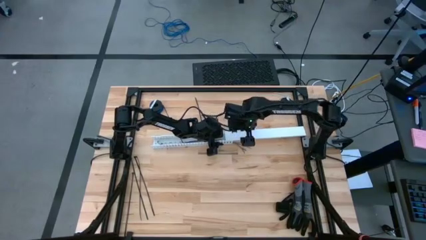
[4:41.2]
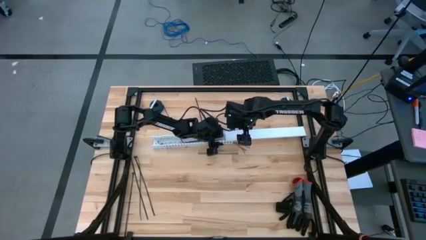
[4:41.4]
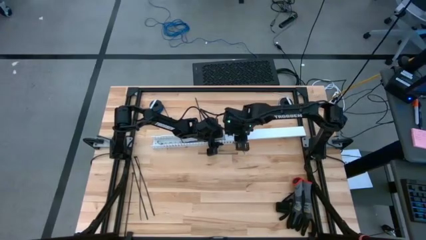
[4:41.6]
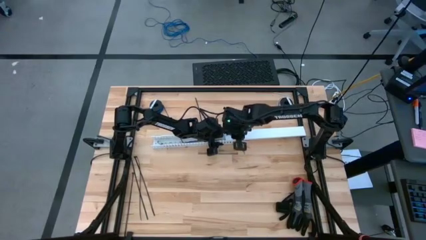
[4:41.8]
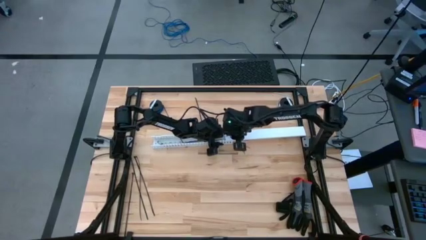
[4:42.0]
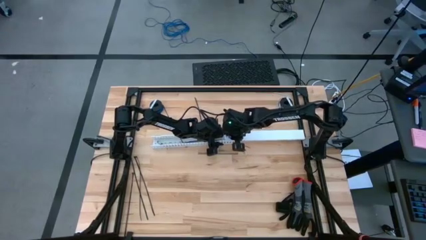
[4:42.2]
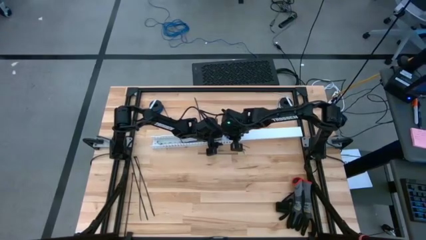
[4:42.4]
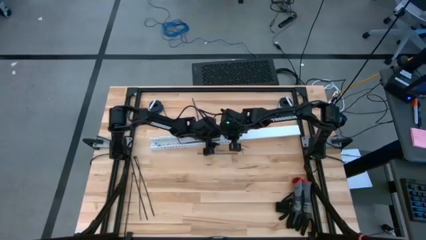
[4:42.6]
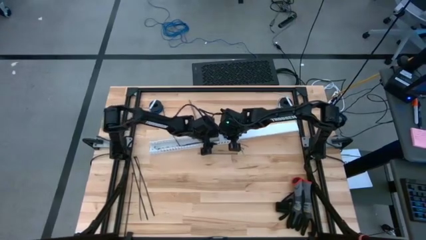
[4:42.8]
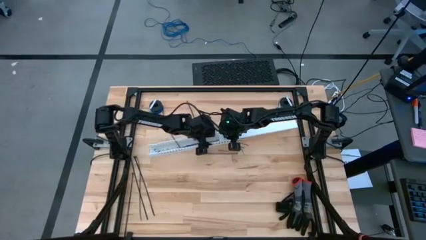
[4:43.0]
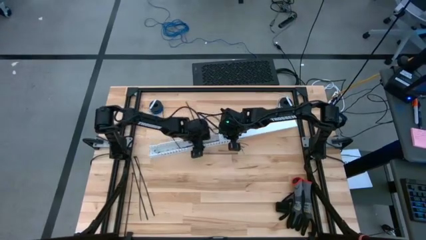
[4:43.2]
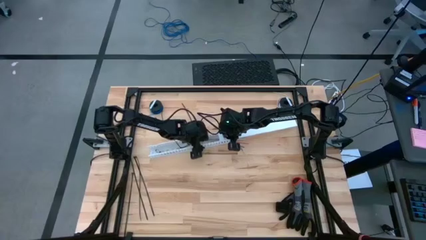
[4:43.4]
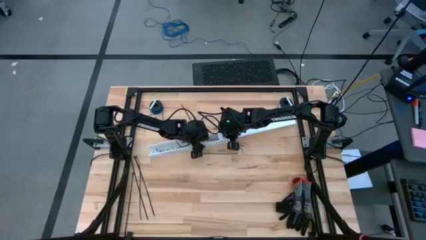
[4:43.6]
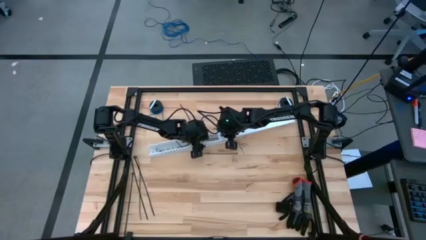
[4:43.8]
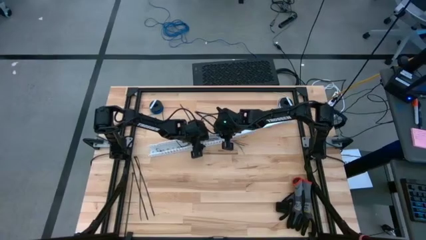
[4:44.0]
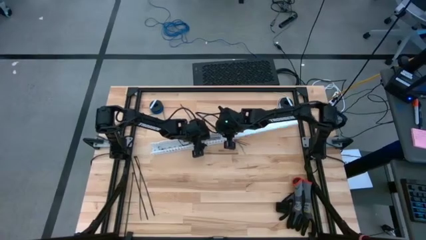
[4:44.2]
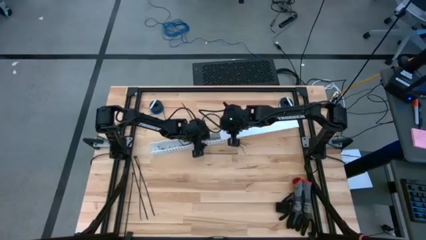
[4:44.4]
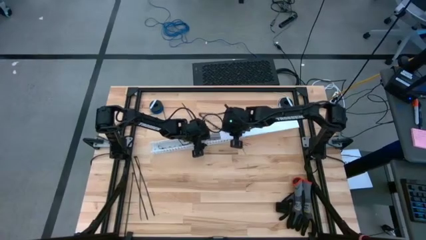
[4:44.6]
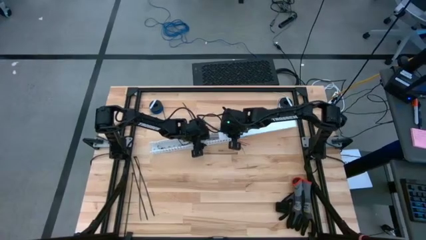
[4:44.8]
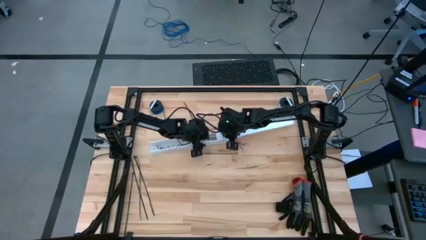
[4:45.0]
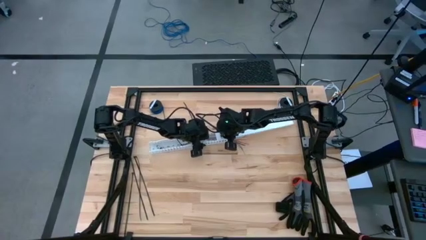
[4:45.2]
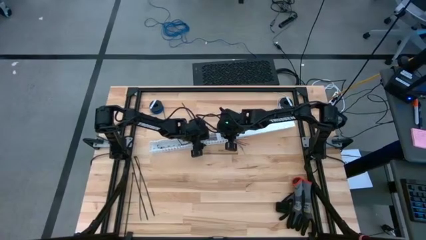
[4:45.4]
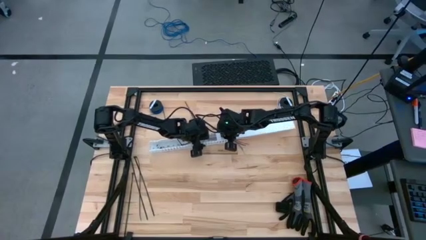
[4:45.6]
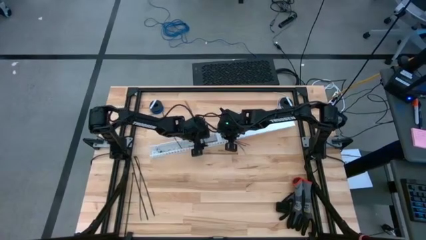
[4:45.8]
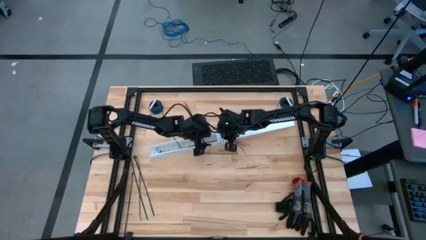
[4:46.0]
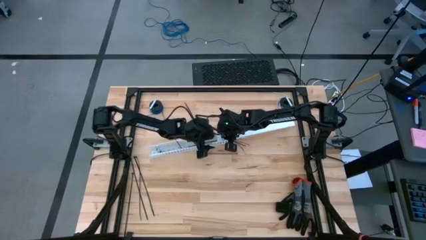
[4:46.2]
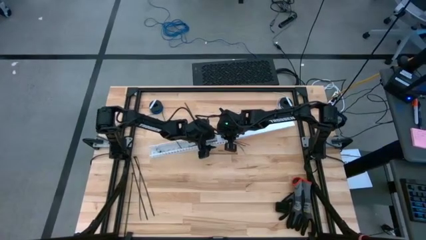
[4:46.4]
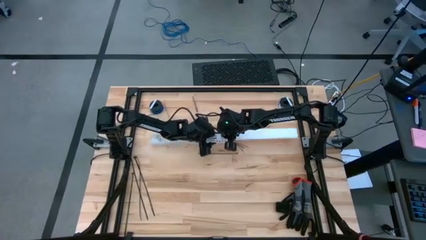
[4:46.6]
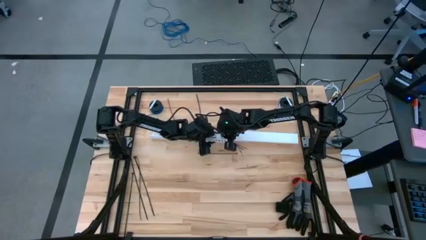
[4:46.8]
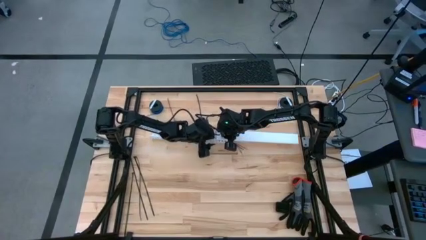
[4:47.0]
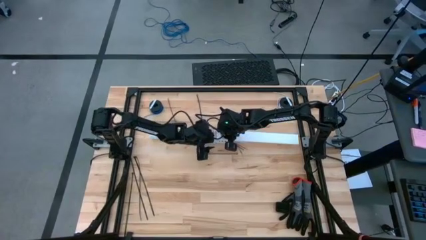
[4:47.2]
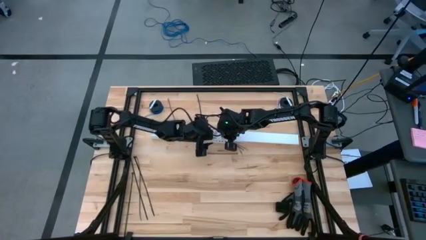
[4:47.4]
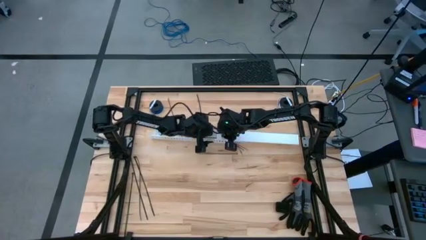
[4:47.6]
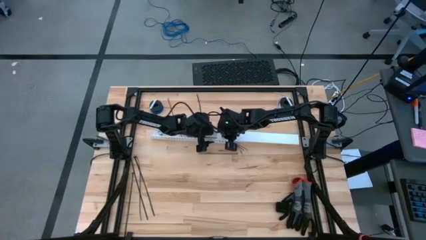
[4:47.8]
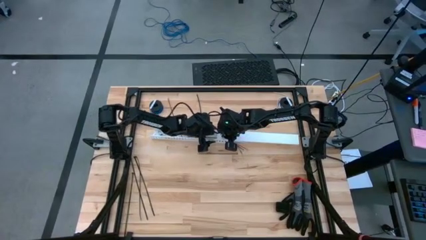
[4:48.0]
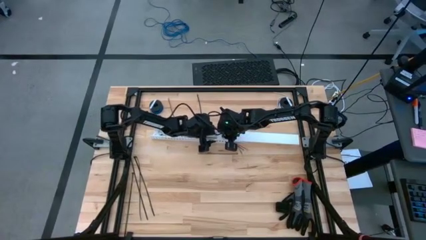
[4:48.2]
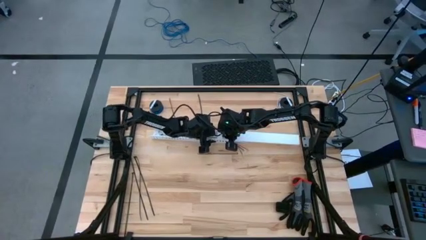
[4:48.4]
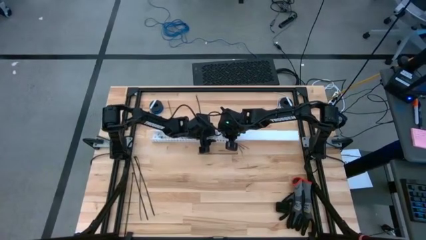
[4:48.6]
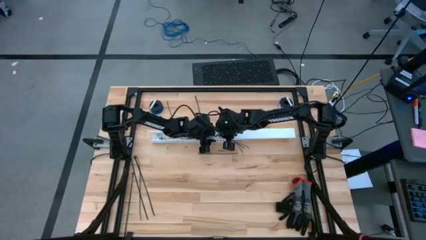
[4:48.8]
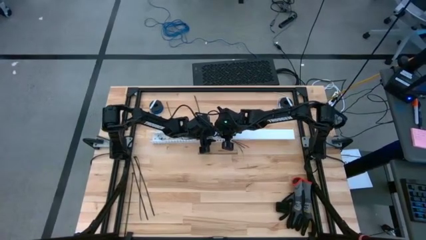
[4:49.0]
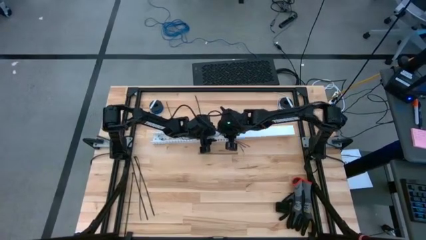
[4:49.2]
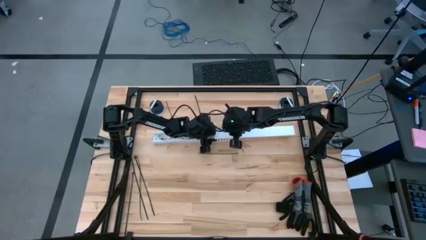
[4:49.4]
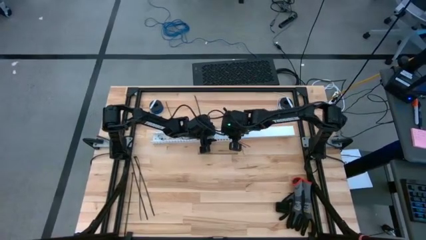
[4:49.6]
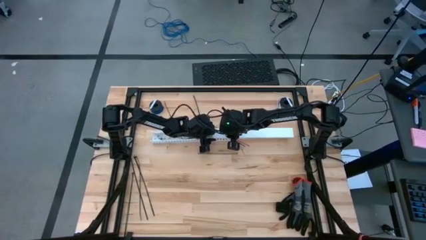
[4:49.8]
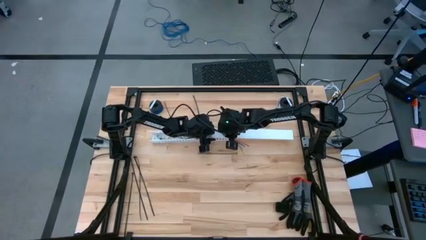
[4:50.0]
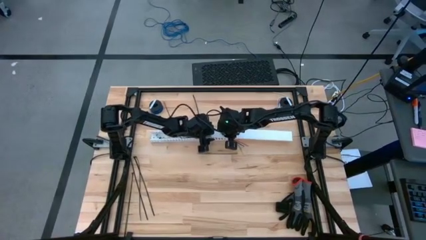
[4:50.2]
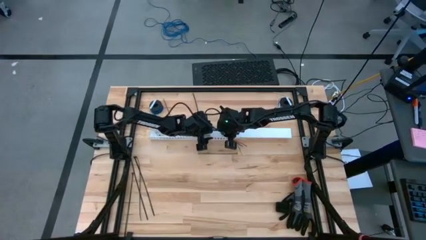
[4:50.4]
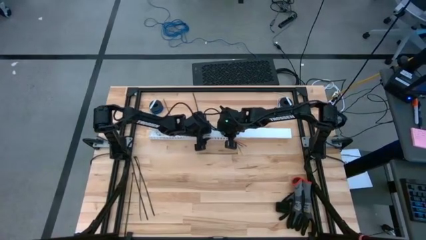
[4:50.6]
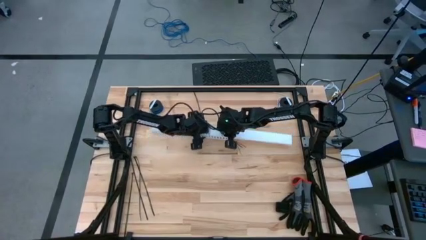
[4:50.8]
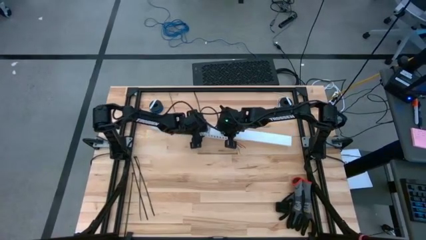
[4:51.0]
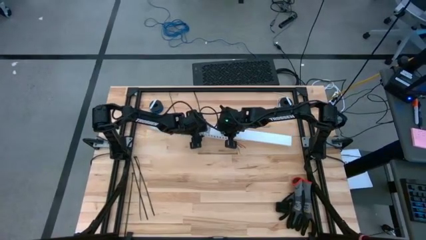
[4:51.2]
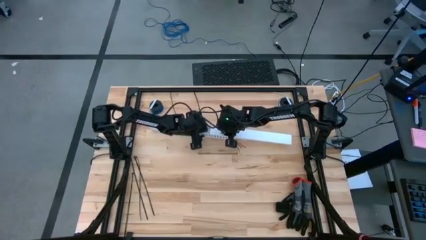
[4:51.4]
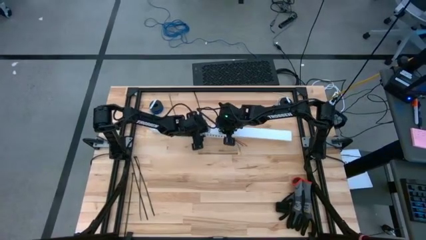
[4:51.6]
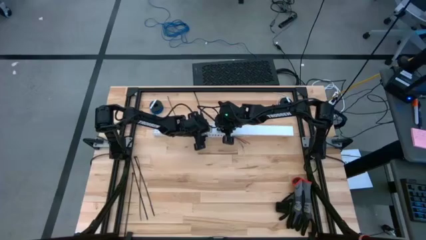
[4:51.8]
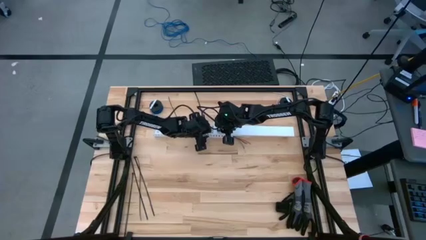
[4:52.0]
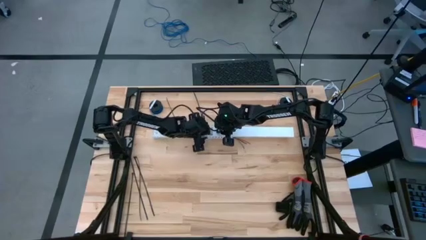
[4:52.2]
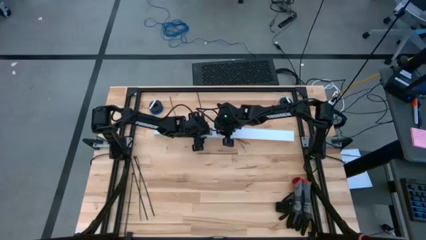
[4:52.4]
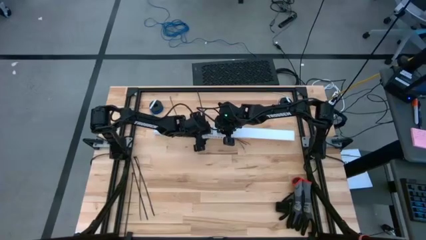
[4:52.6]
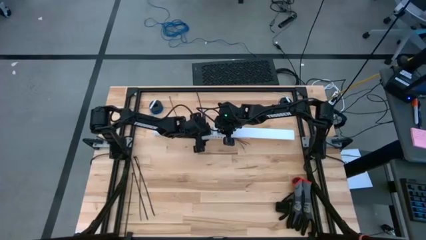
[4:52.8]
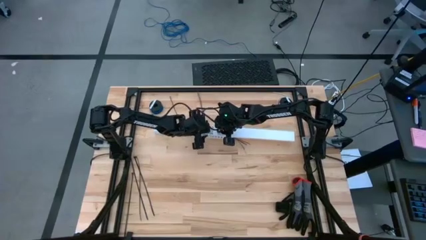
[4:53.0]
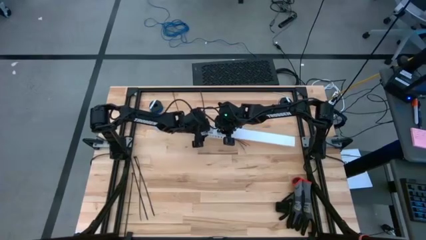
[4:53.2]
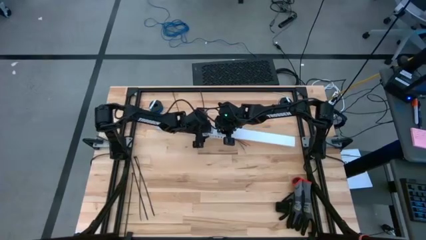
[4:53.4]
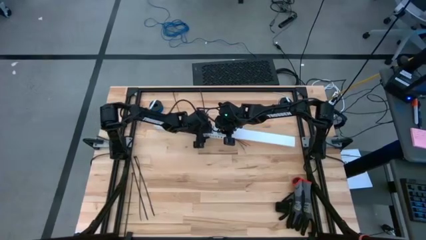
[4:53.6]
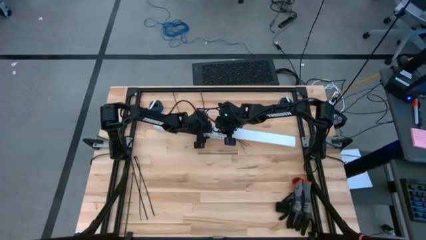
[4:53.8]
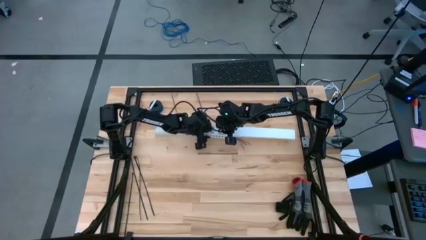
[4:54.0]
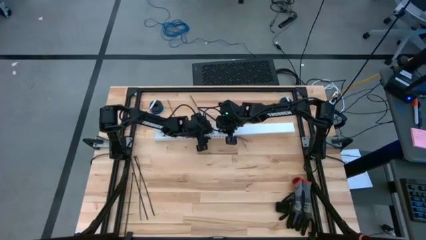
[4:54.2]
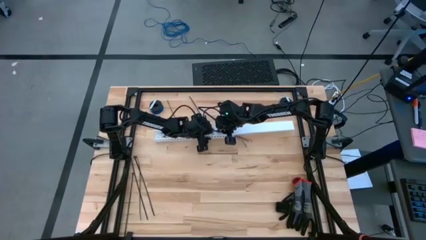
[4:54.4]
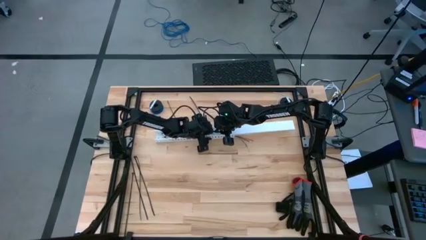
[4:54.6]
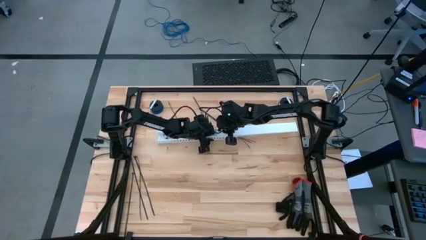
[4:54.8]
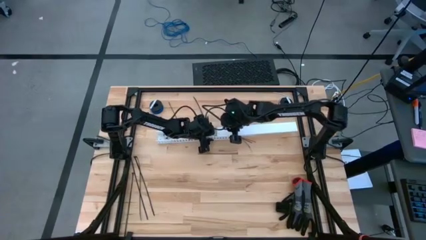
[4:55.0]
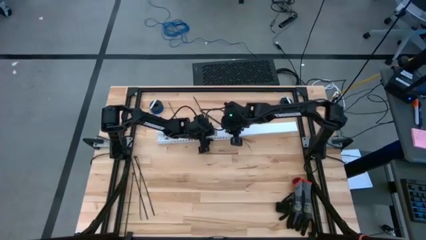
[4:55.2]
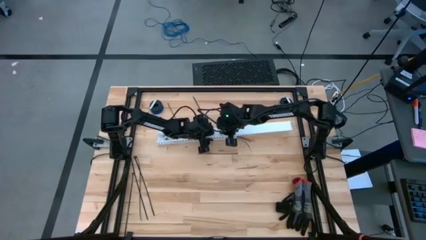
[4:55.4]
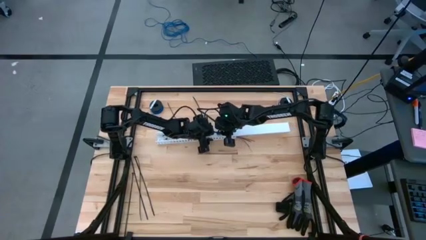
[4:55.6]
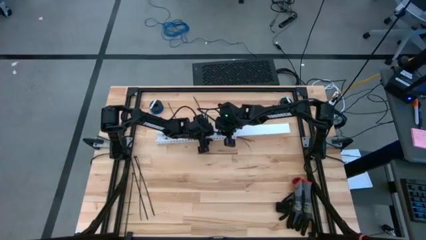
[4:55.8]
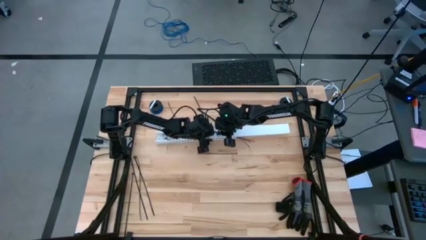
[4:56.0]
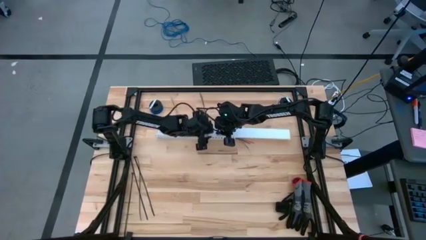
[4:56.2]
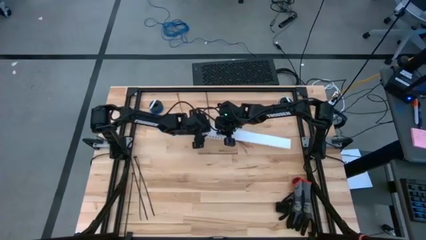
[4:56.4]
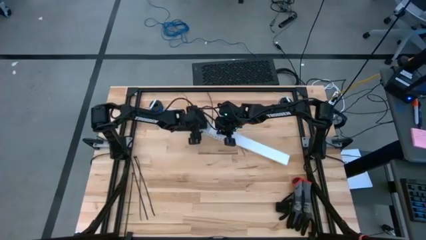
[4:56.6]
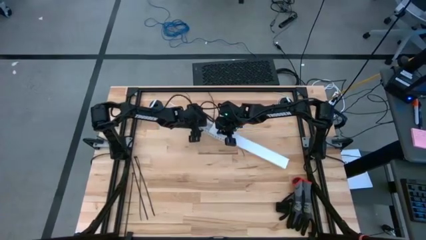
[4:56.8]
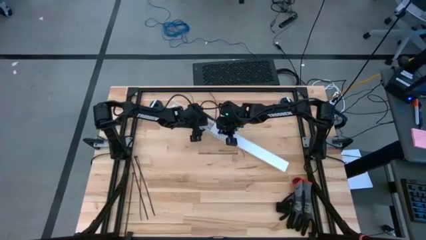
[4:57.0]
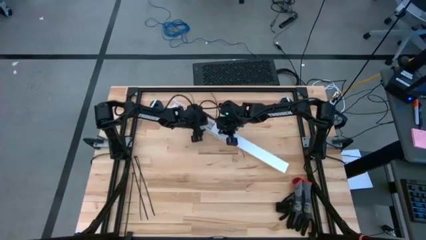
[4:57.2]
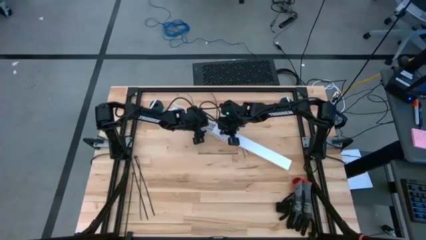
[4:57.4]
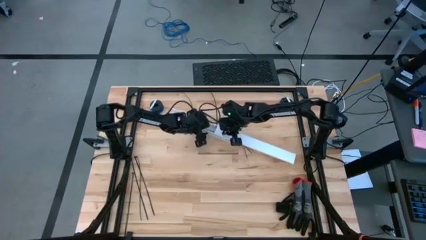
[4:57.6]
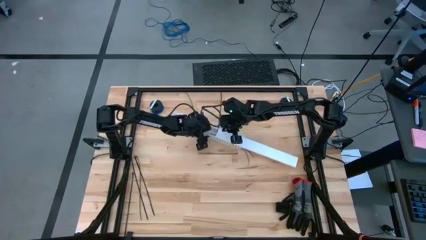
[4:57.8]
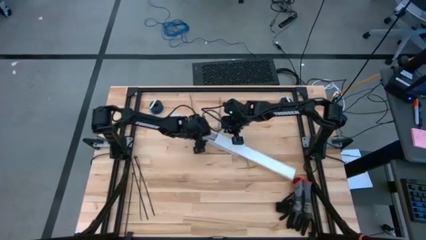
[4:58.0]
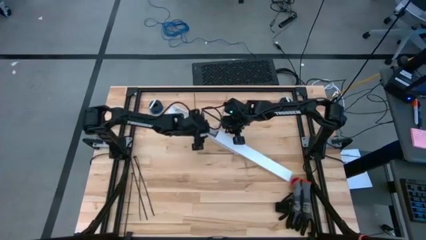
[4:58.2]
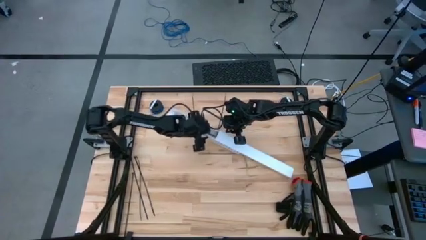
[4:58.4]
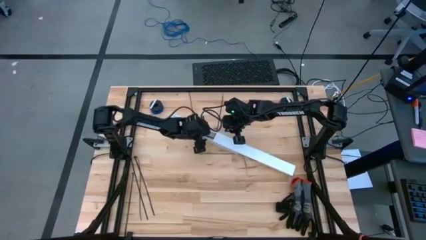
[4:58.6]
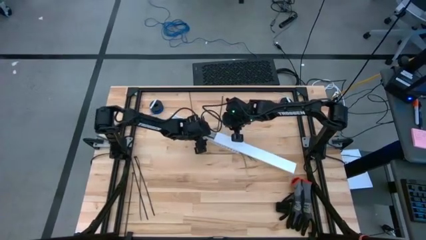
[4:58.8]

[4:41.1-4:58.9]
Task: Ziptie cables
Close the white cable duct
